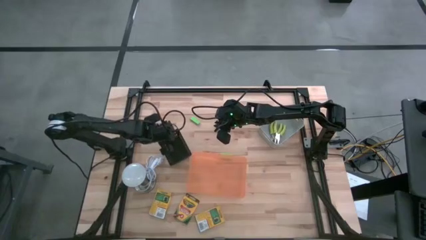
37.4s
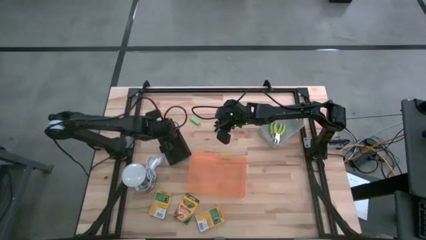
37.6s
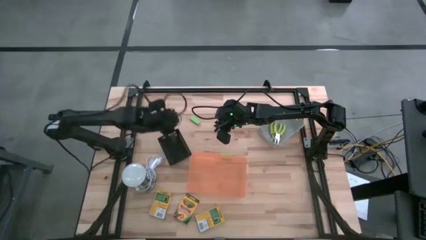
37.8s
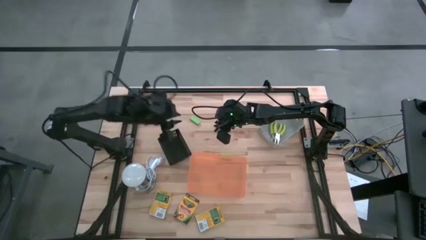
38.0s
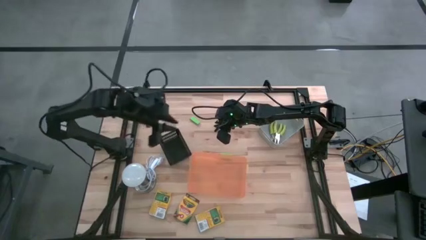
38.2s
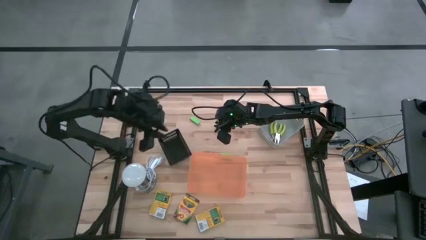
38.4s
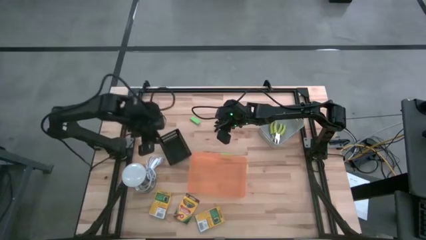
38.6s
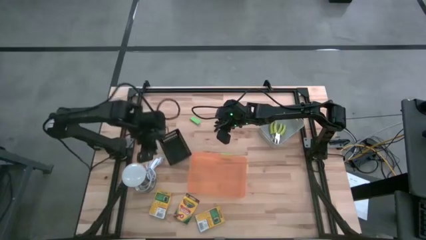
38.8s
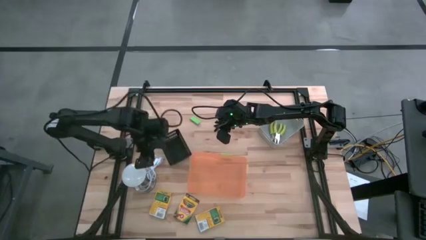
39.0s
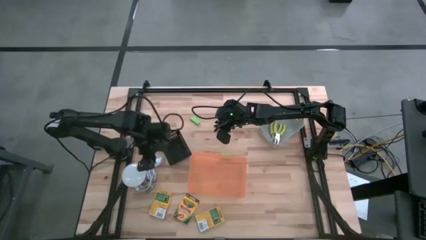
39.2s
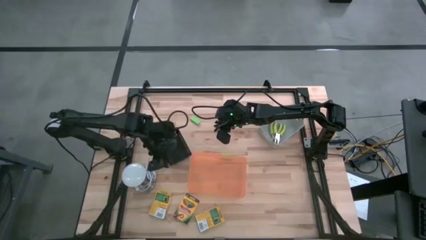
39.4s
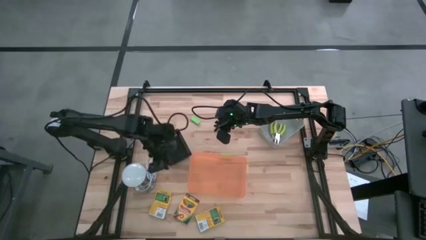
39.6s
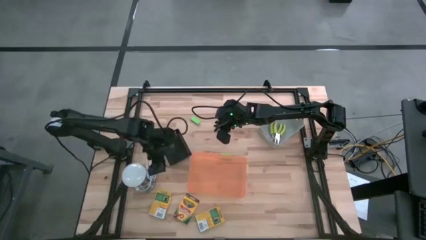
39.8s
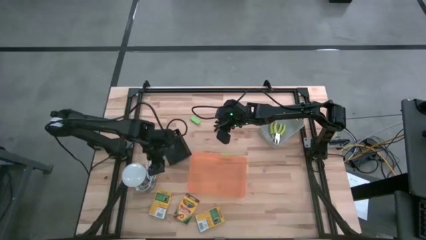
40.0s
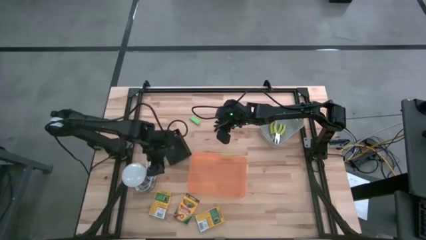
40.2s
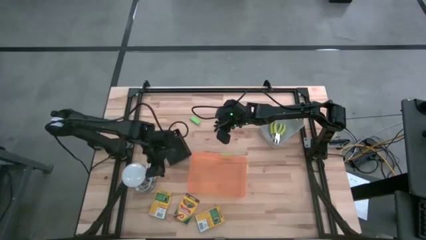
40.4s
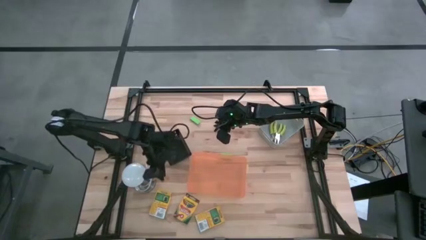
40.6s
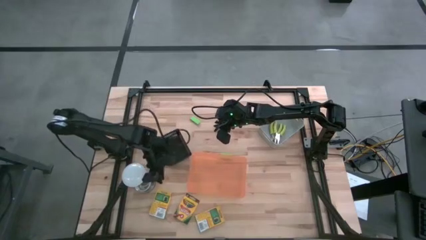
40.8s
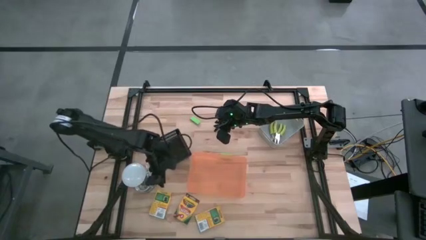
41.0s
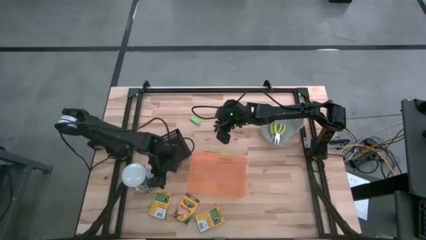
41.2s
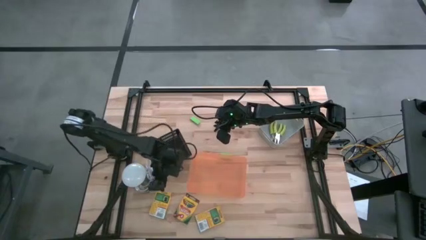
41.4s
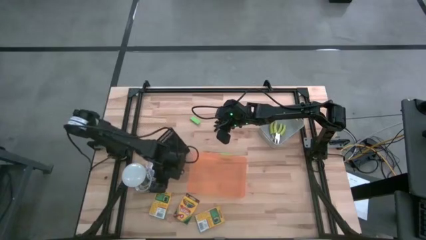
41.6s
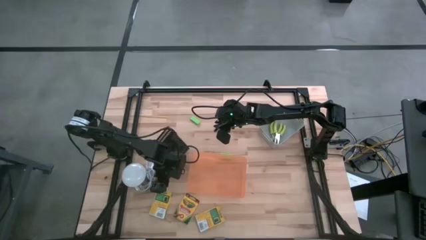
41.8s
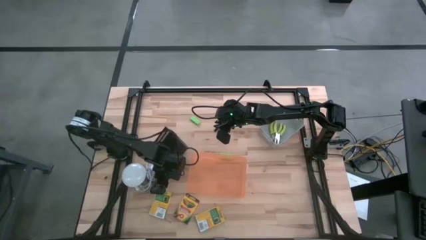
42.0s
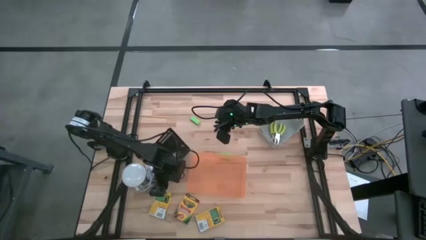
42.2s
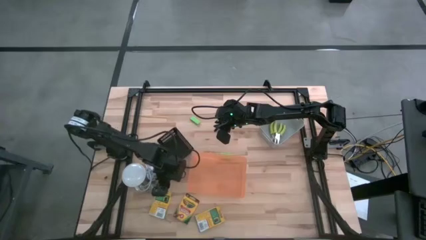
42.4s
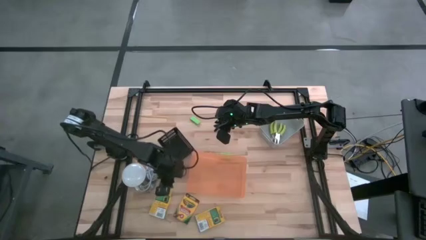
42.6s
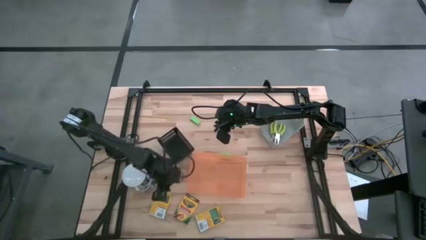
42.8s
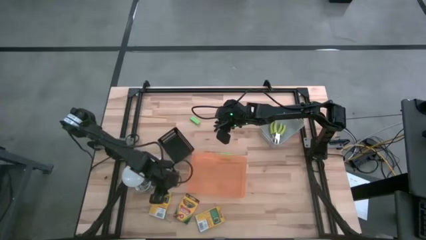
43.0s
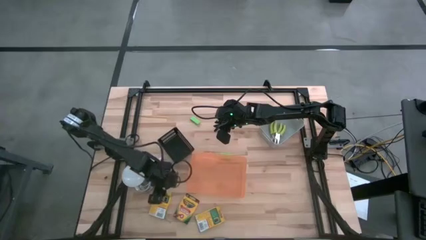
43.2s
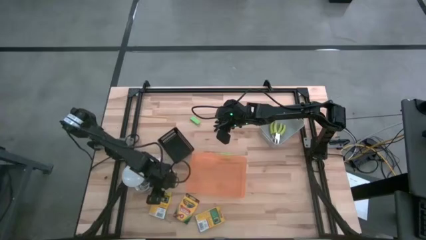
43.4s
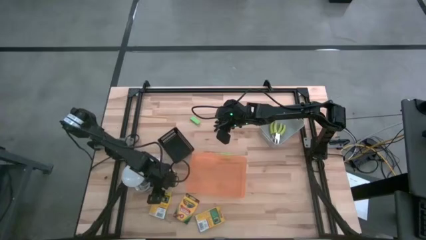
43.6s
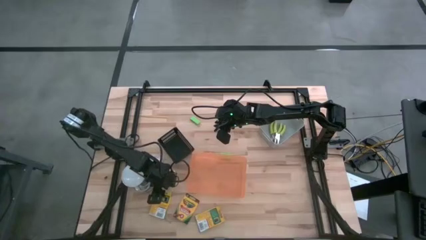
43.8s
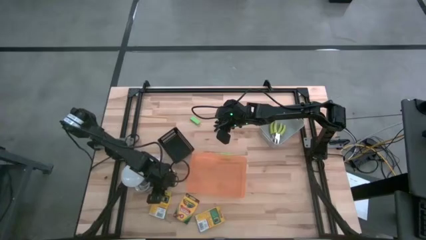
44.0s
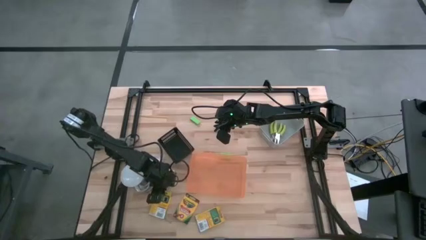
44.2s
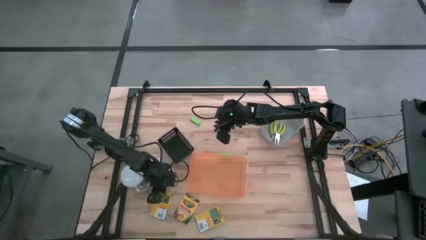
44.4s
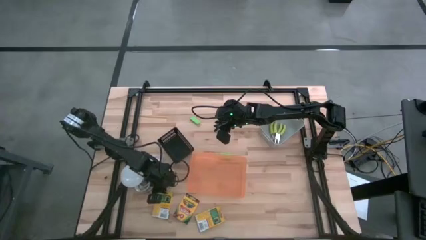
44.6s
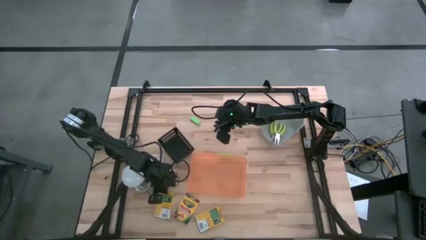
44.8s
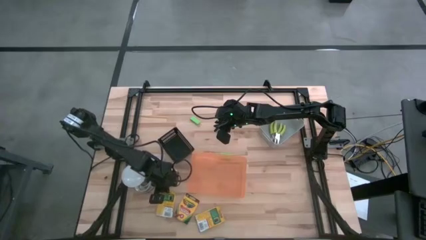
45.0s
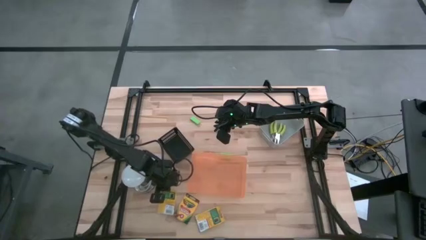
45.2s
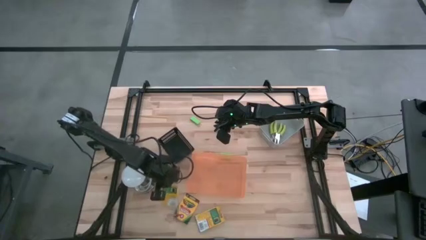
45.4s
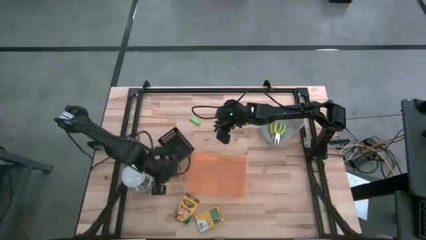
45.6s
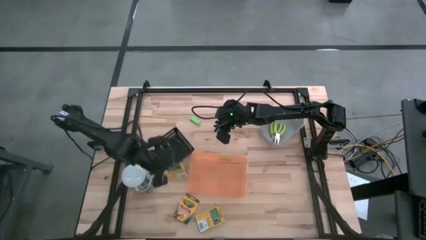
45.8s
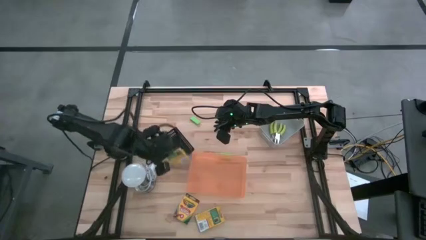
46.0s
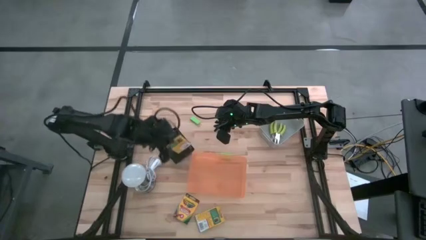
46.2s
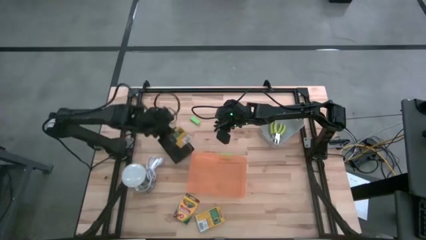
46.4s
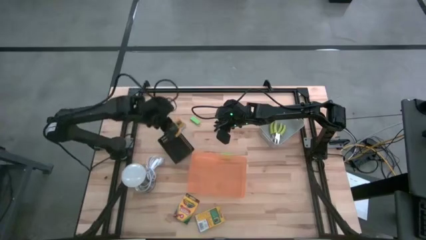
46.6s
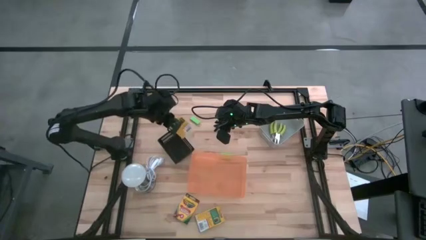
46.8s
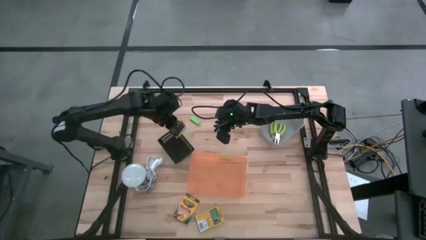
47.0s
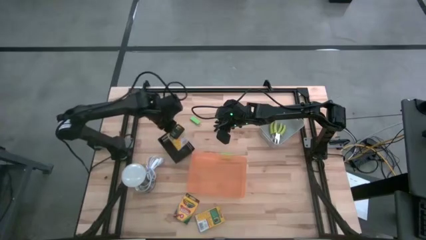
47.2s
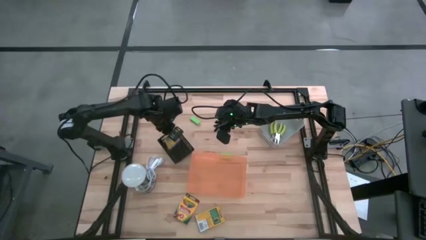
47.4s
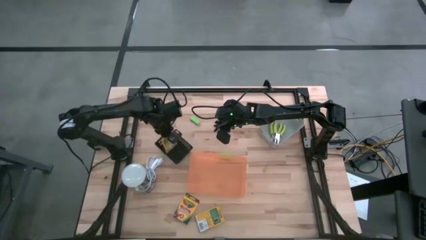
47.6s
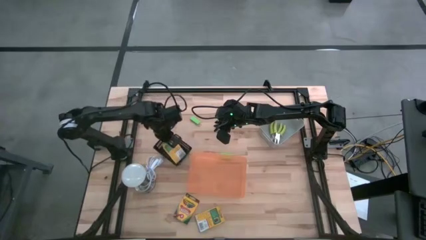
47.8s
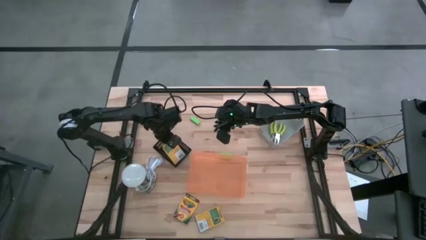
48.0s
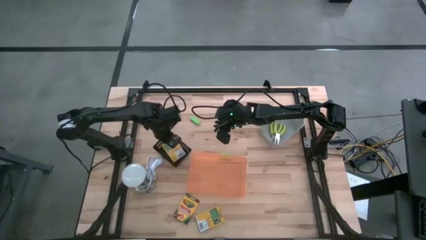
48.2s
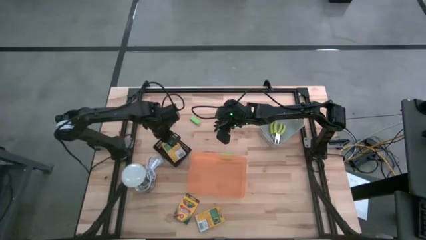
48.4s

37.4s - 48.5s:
Task: Pick & Place School Supplies
Put the left yellow crayon box into the black bin

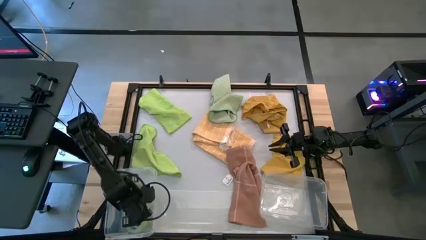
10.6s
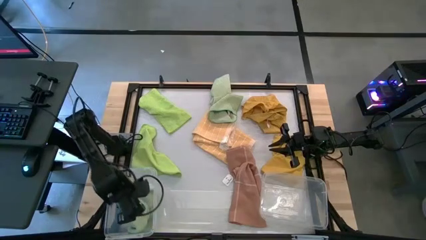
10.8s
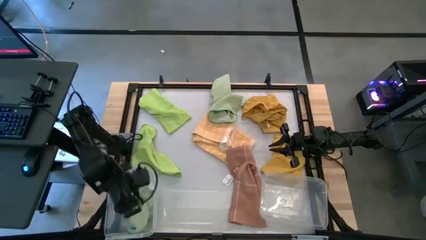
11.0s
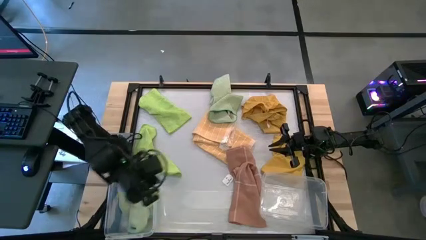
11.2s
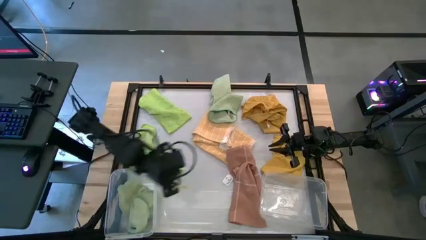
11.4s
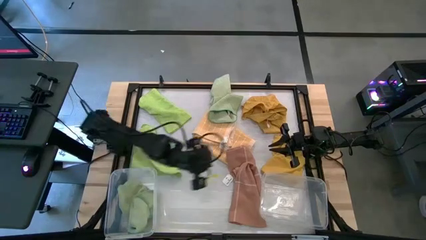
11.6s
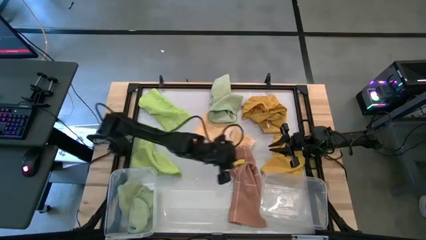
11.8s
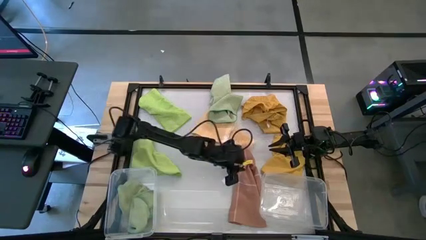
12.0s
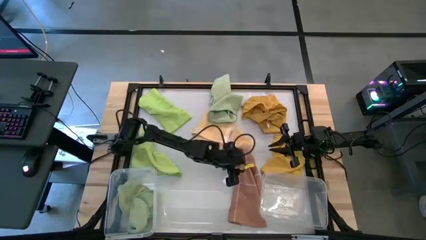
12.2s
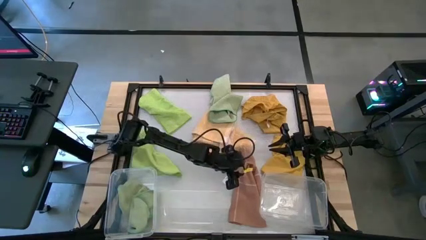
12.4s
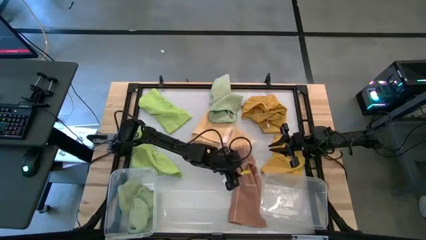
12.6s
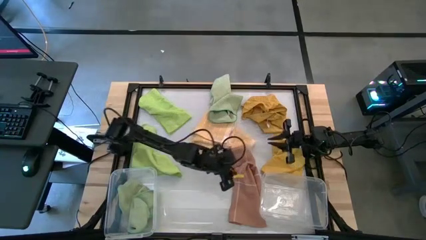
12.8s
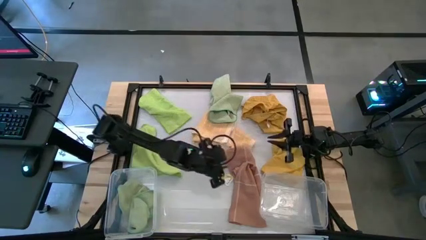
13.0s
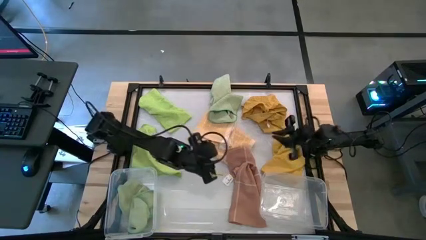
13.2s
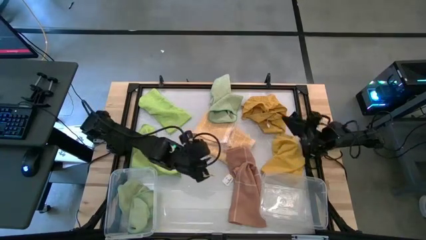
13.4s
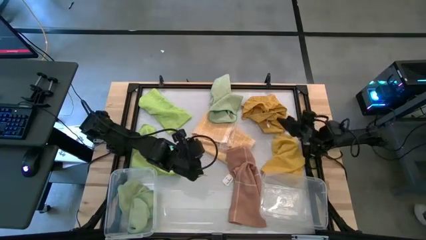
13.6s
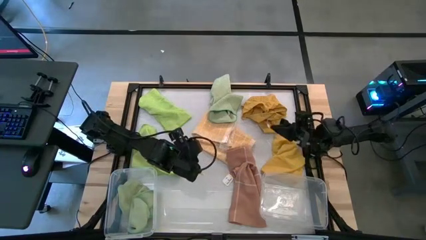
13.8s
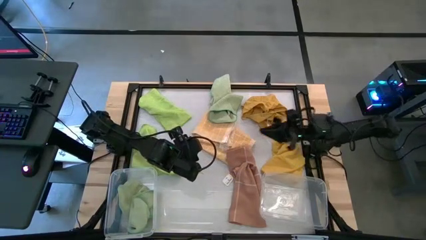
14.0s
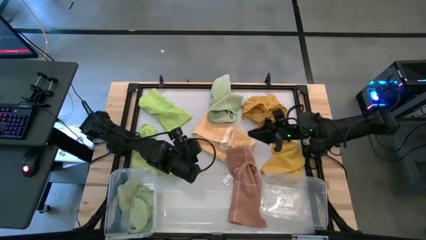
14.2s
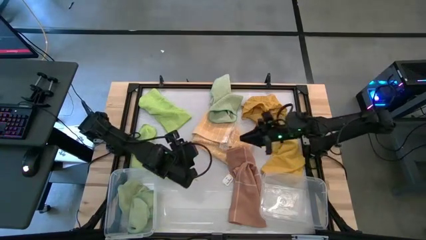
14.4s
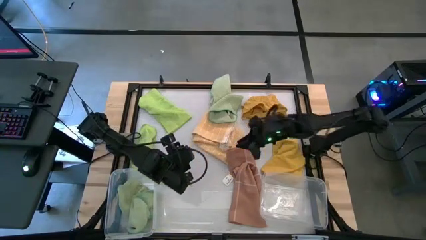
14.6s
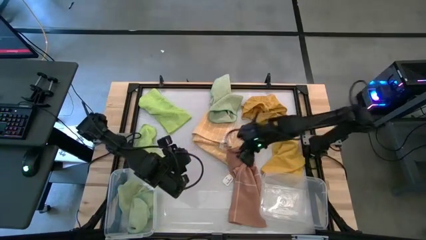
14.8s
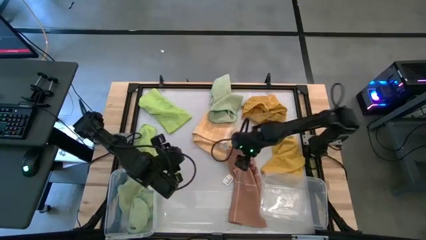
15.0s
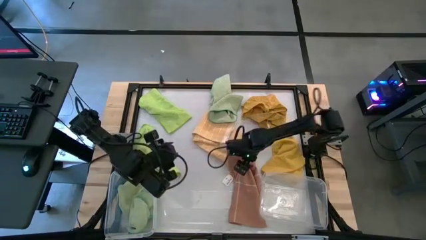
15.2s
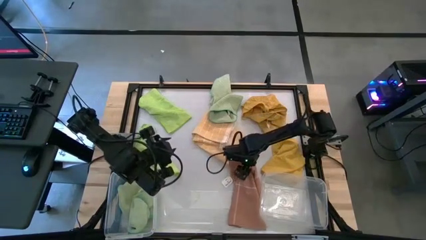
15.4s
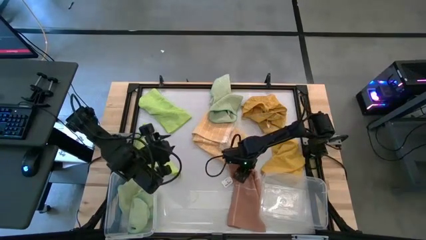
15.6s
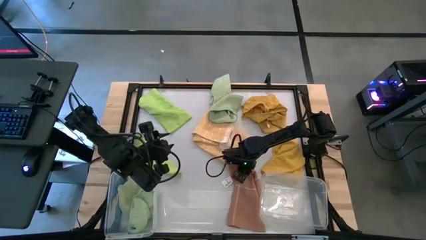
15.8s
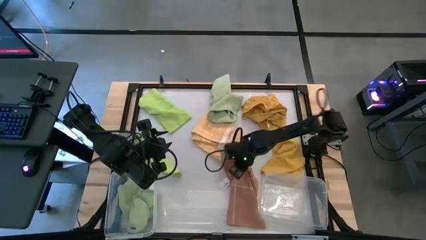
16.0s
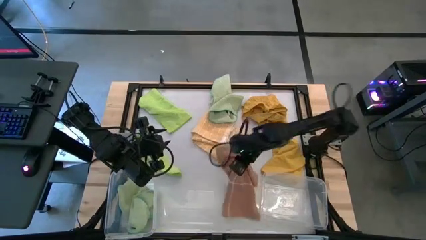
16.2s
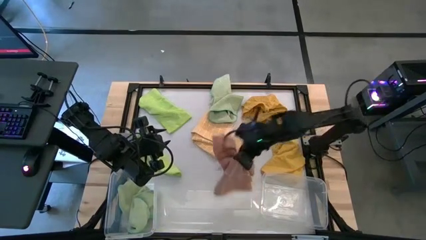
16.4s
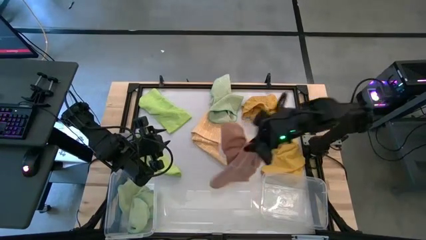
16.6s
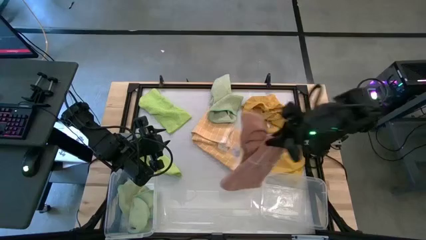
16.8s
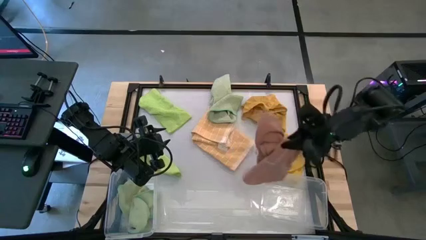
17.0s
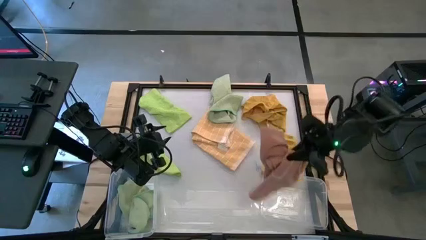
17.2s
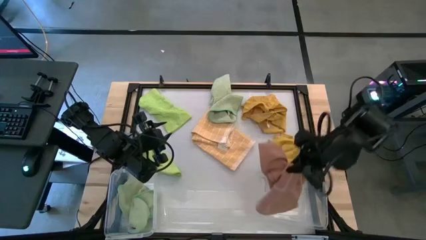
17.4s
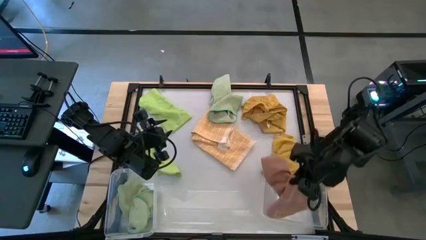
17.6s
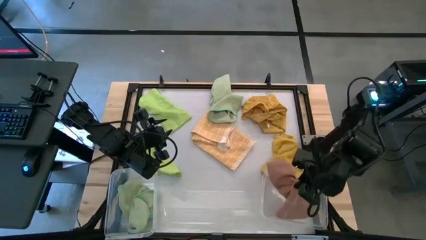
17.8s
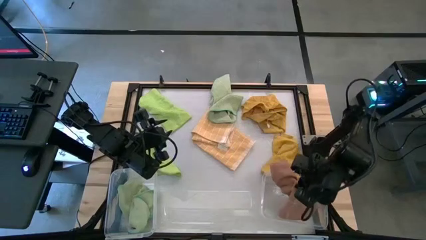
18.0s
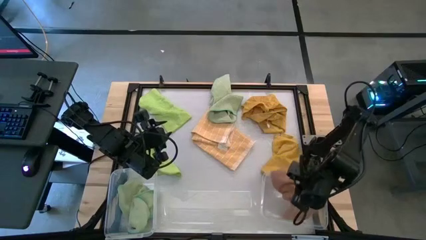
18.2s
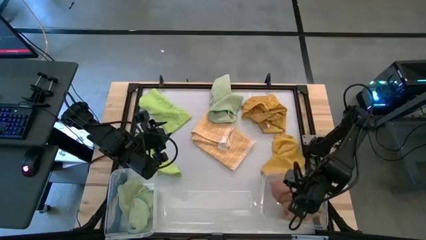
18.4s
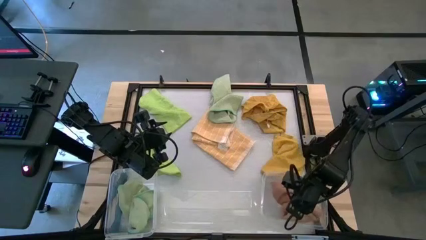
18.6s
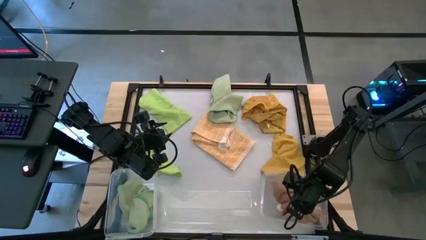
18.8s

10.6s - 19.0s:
Task: Sort microfiber towel by color & place in baskets
Put the brown patterned microfiber towel into the right transparent bin
